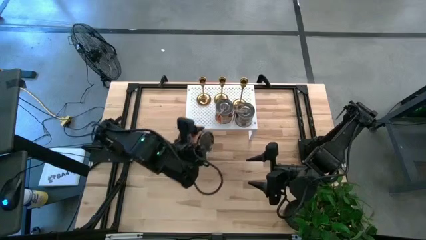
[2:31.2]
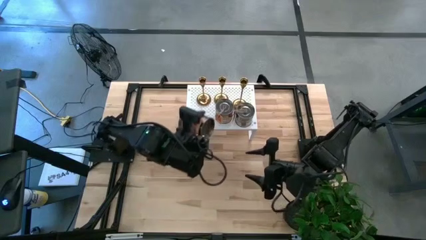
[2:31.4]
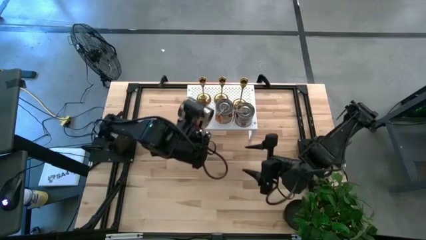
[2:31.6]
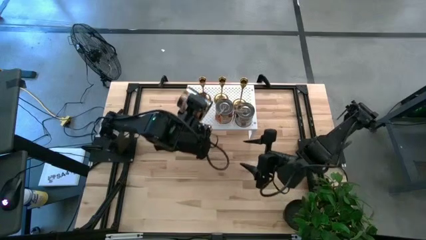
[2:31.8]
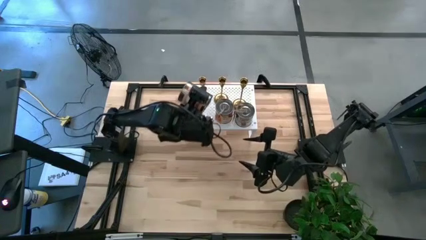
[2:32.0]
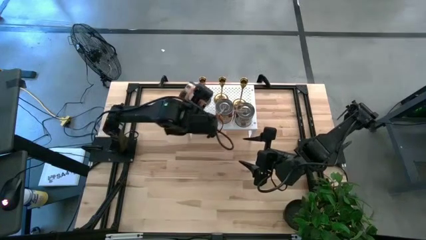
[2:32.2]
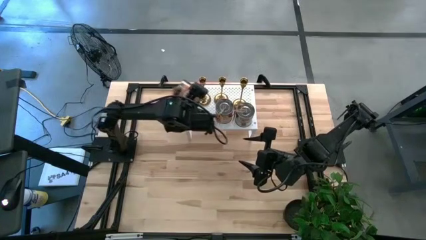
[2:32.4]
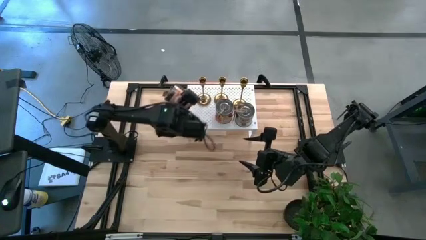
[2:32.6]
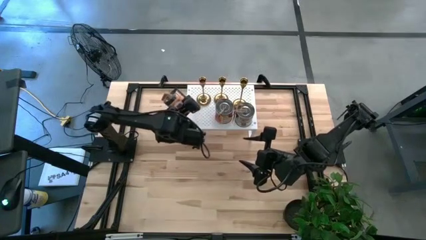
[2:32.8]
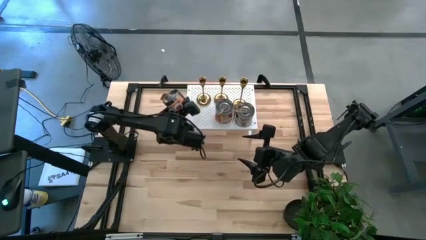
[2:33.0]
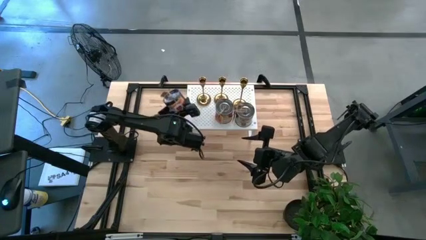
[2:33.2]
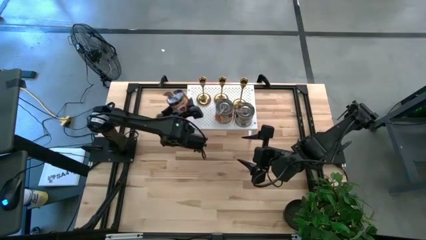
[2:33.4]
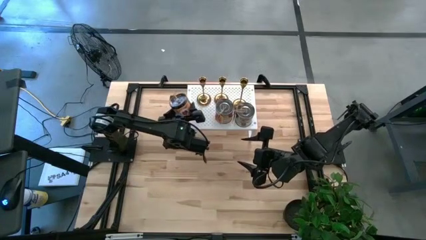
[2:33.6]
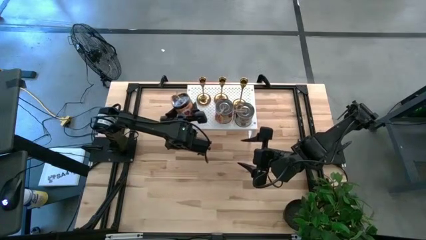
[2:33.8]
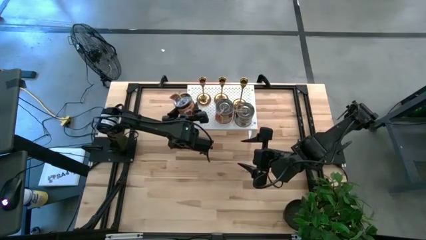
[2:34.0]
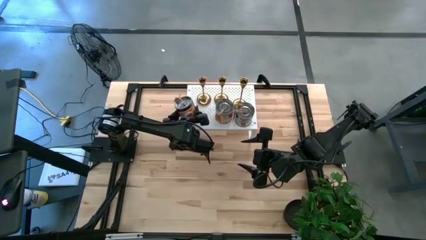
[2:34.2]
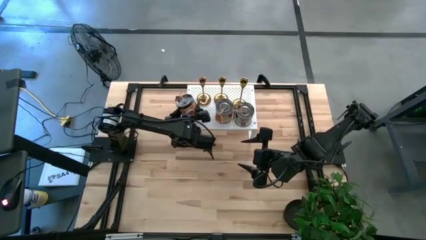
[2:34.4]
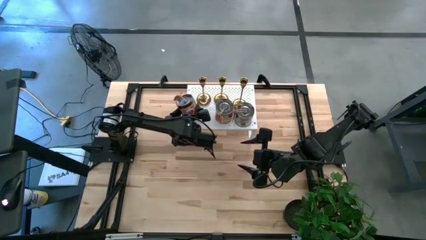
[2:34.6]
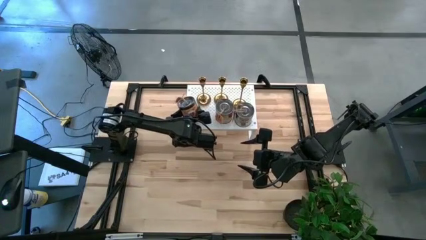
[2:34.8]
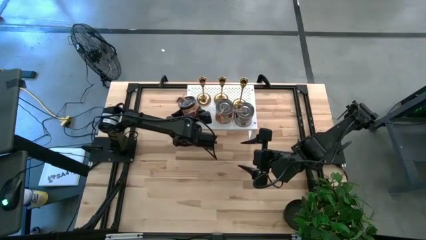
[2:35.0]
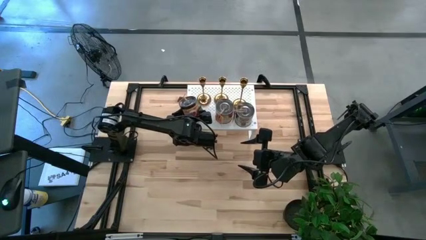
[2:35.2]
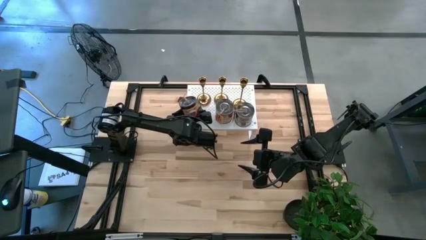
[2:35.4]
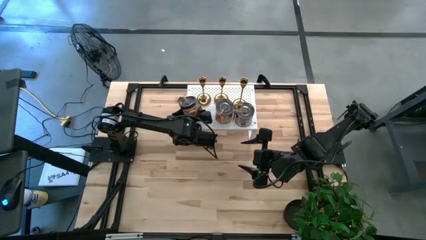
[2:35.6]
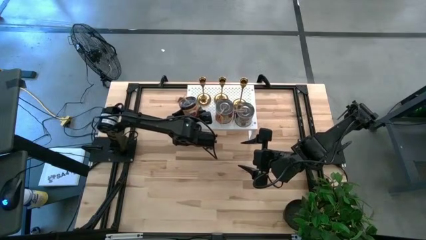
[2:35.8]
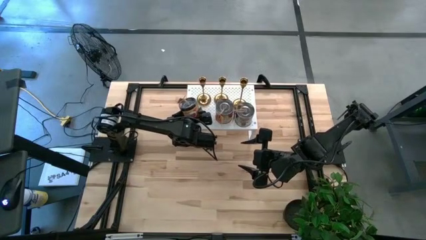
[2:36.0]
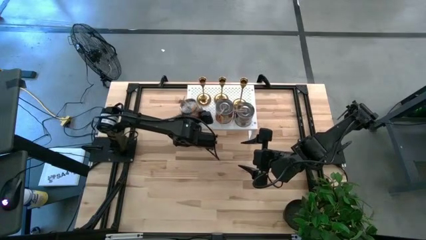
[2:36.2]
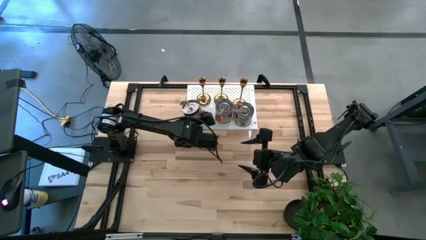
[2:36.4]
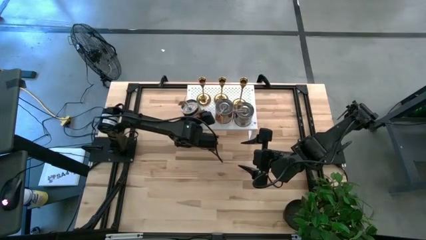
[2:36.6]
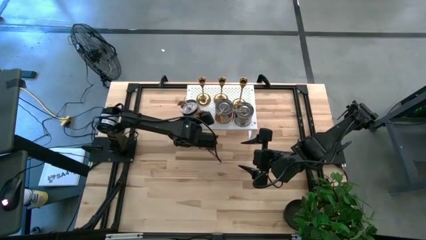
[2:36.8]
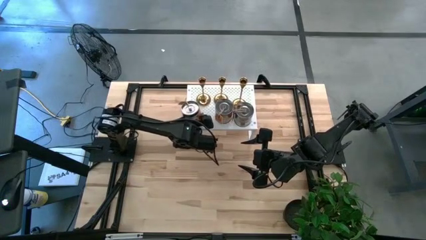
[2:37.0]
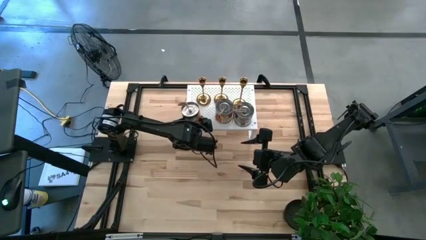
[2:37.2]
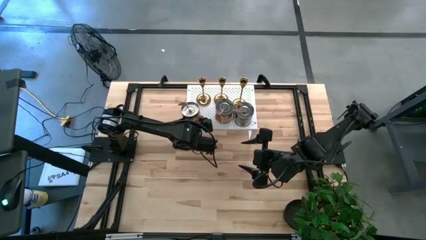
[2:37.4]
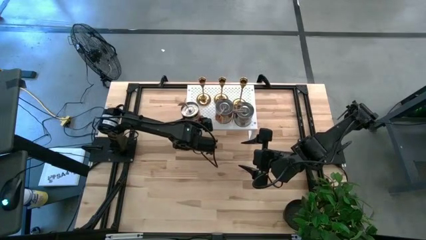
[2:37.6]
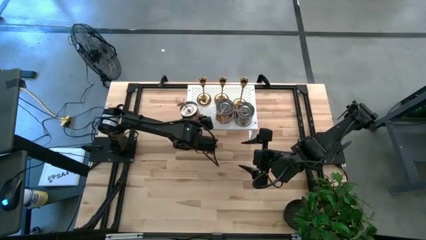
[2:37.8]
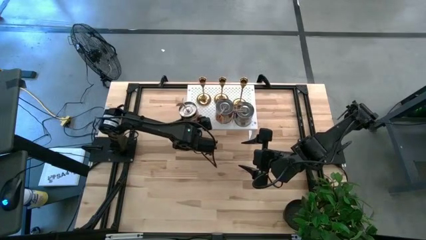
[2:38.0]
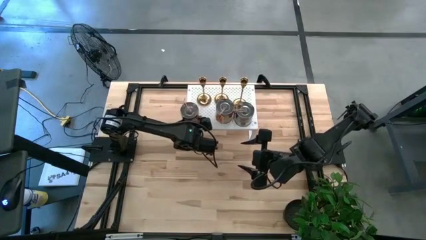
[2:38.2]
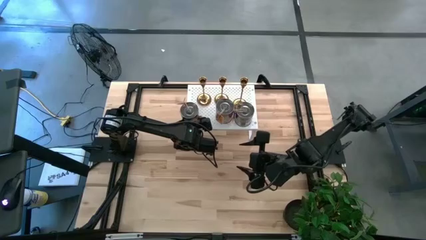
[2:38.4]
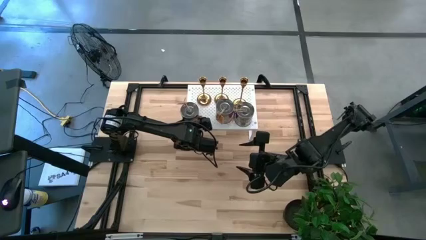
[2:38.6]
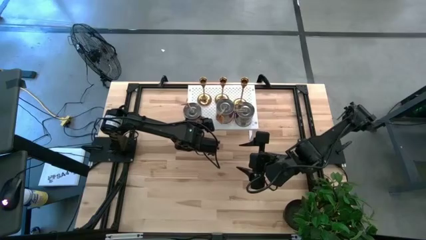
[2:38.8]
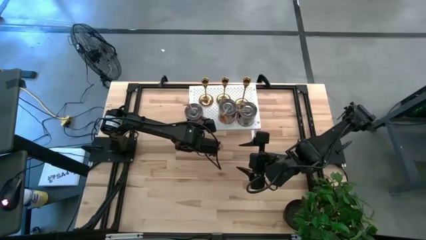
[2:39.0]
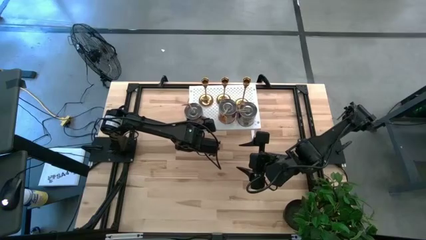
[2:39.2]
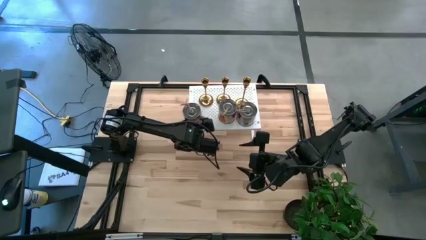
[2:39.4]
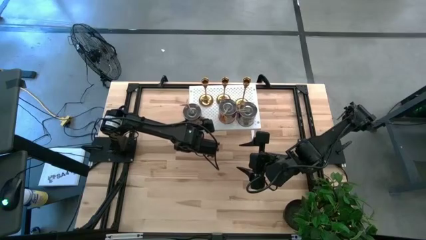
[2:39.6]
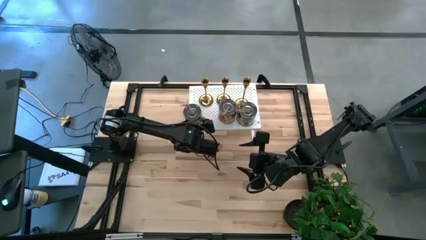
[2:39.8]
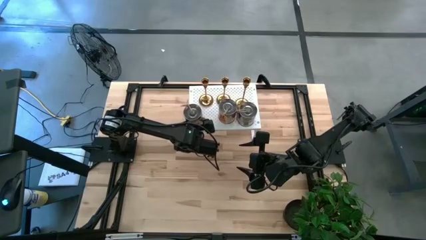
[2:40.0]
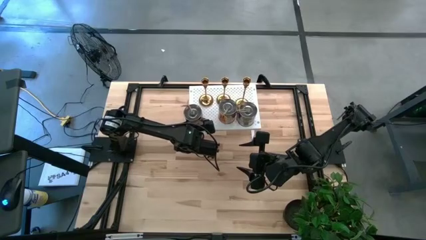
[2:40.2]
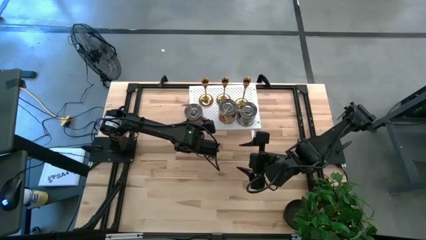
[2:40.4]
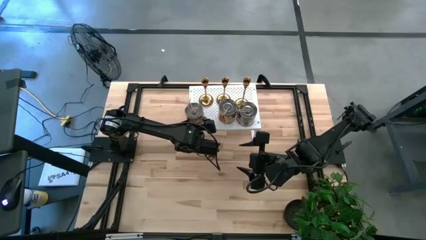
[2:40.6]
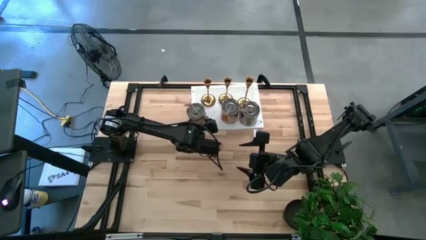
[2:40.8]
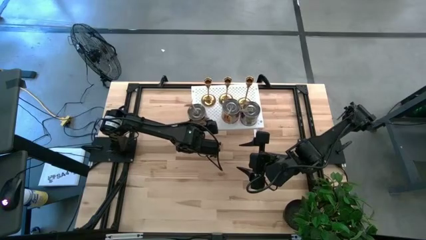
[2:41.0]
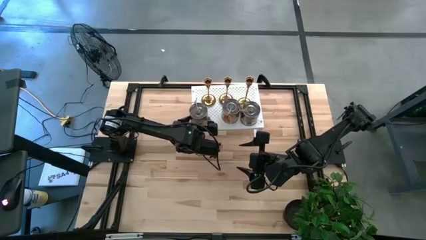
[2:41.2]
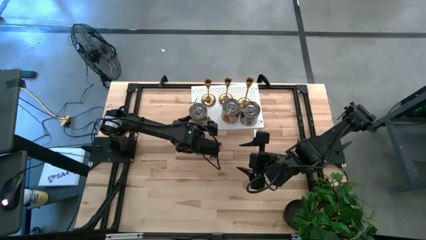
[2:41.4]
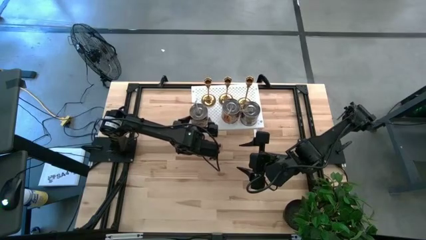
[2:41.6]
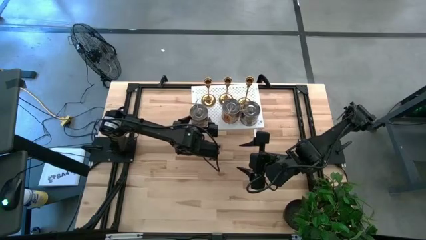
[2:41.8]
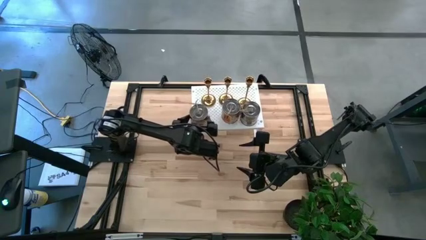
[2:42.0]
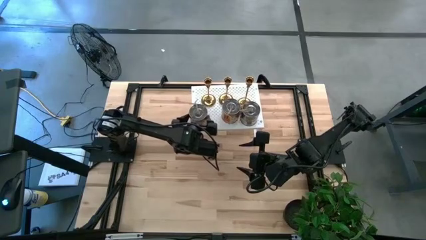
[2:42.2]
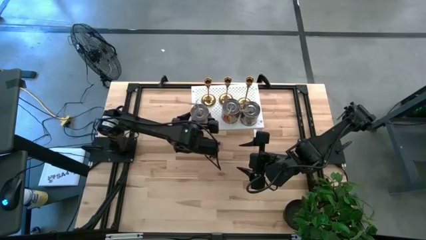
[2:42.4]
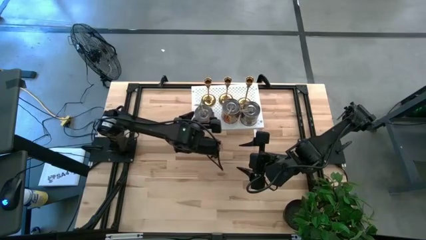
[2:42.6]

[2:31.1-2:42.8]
Task: Pick & Place candle stick holders
Put the silver scented candle on the shelf aligned with the other silver scented candles

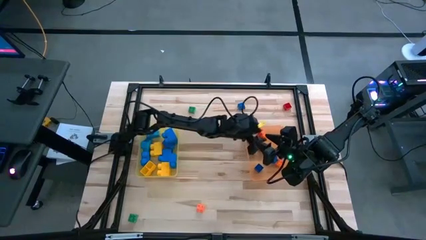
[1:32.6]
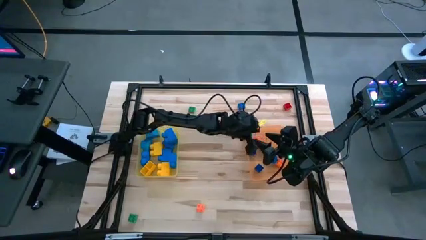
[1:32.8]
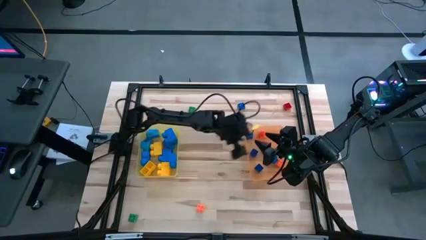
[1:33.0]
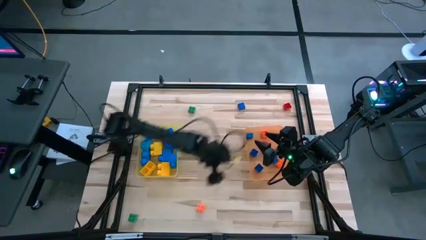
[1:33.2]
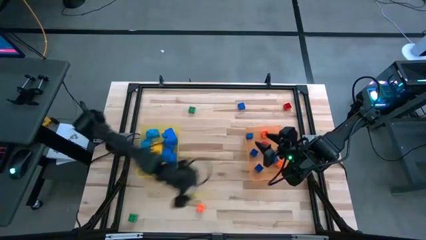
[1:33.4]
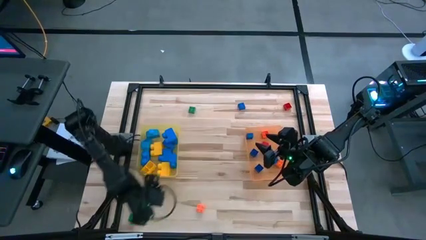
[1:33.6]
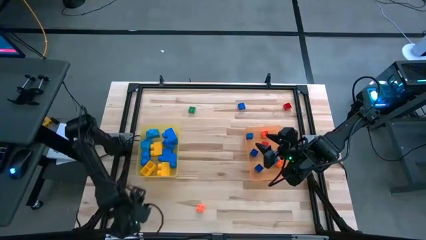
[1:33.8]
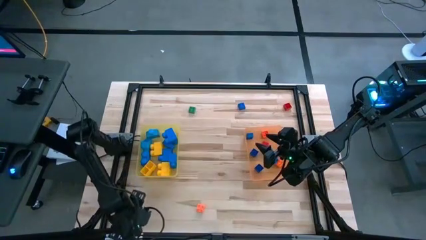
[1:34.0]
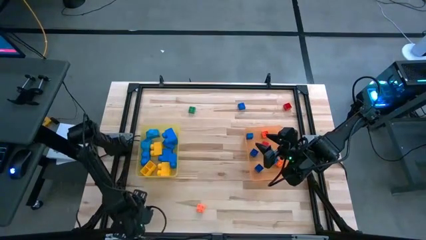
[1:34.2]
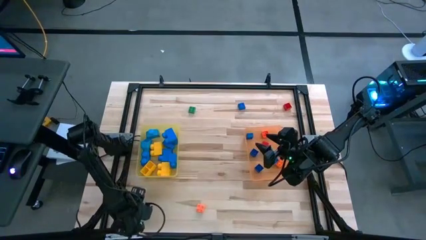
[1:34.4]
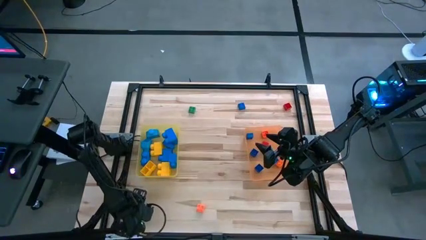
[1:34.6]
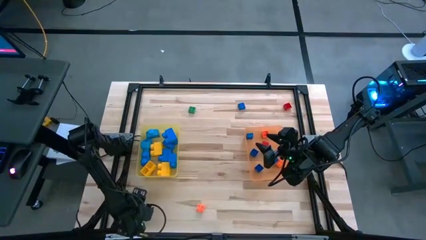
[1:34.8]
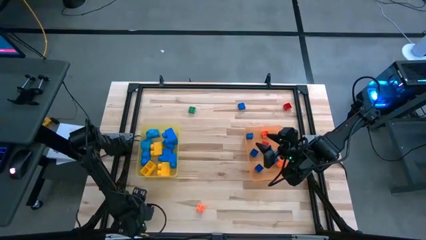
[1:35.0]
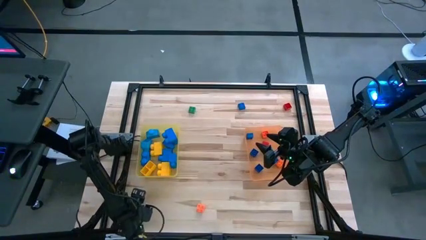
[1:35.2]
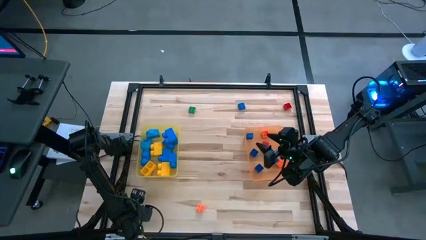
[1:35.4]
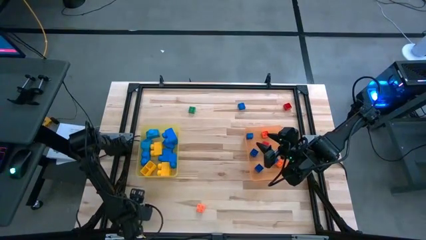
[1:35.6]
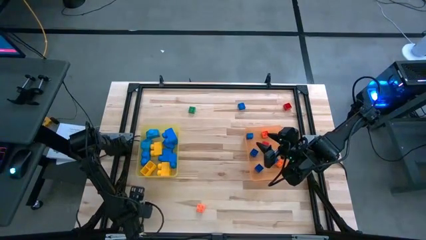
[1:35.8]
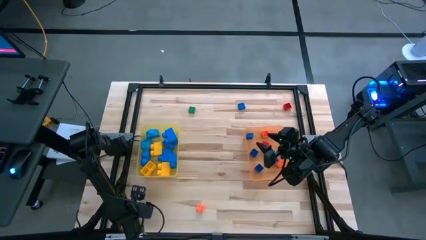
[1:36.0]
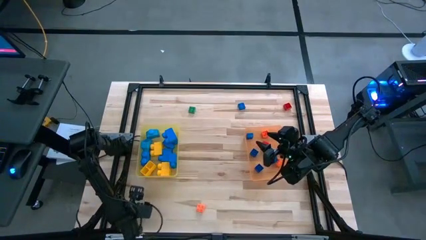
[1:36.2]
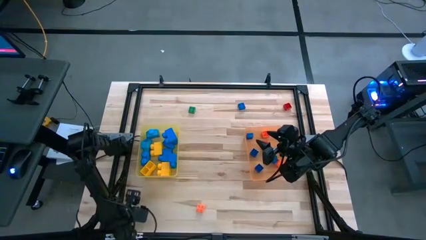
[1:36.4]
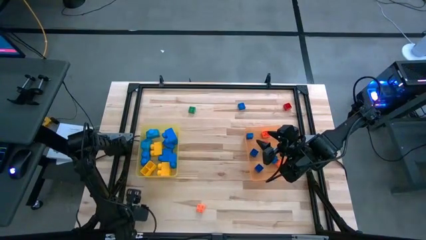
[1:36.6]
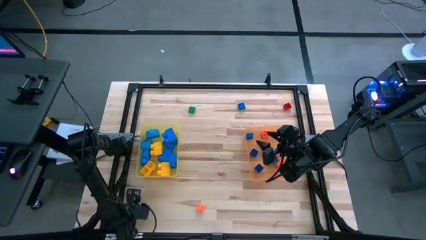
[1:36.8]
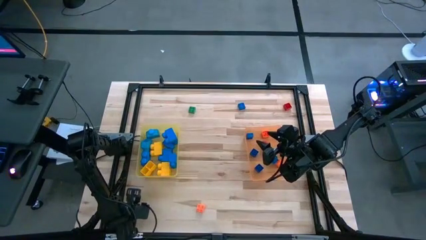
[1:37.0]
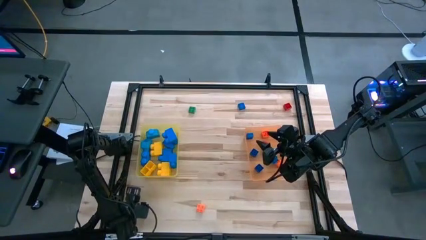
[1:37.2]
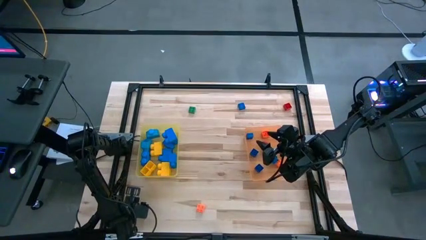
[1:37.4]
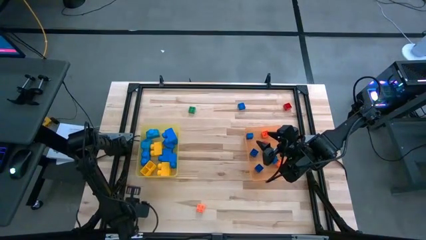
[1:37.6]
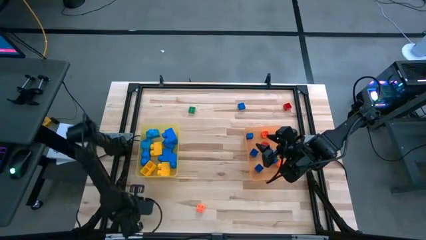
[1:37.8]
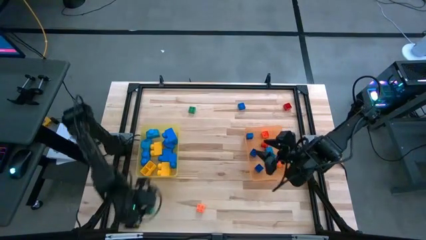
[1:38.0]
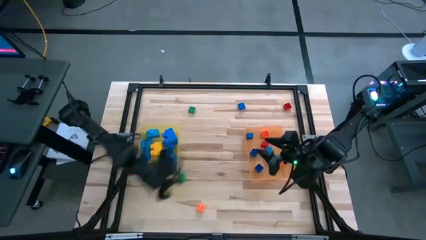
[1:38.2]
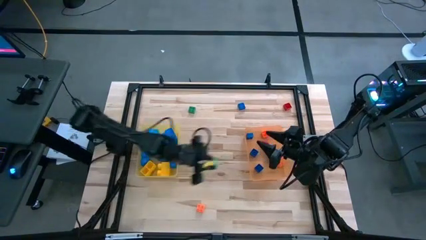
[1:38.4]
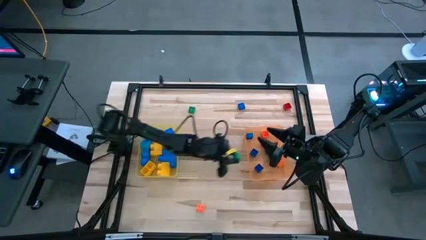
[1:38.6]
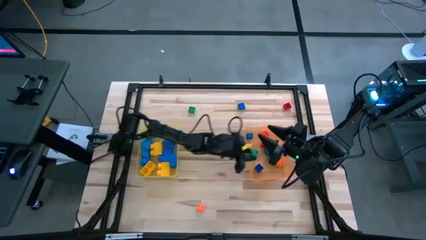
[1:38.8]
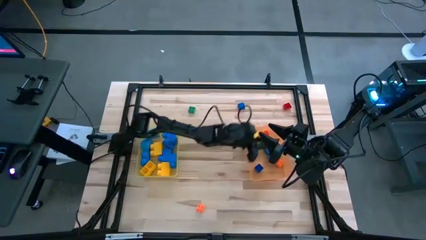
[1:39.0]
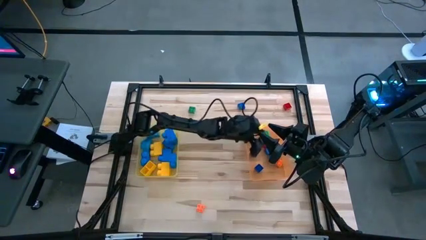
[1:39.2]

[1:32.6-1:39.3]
Task: Sort blocks by size
Put the small green game piece into the orange bin
